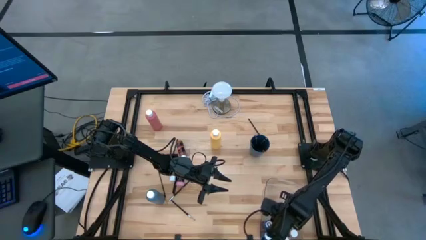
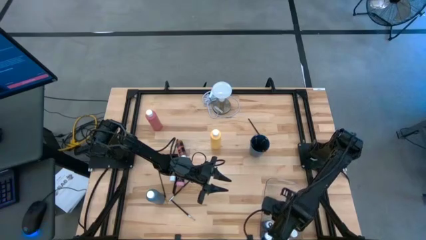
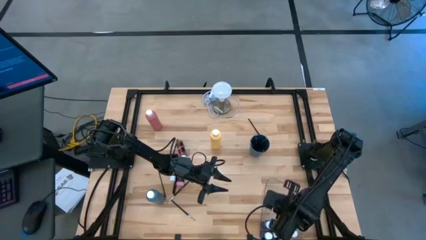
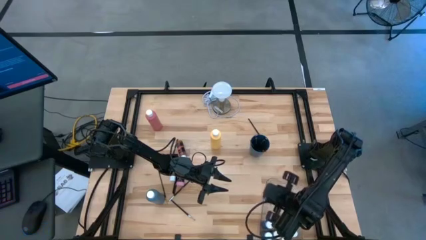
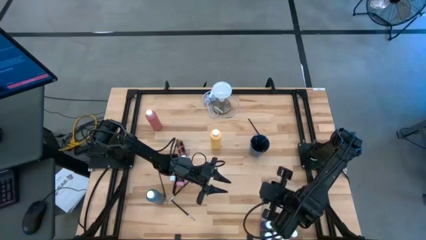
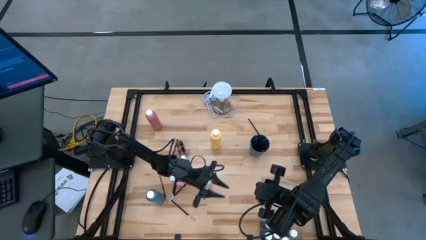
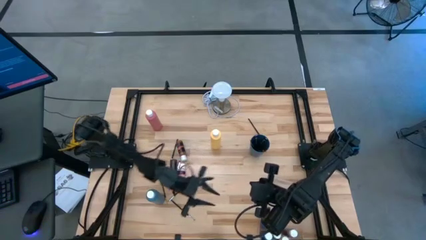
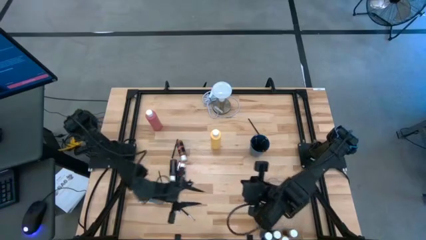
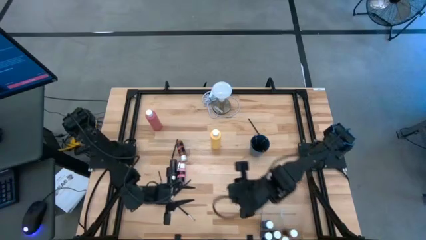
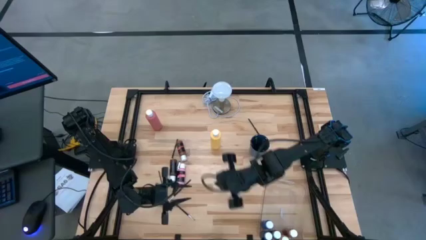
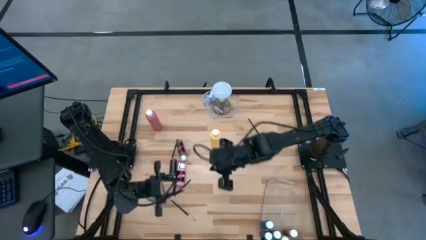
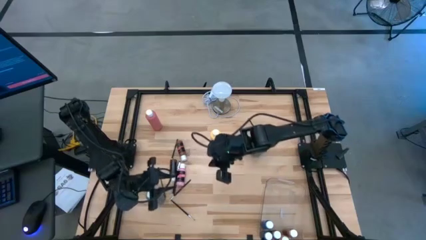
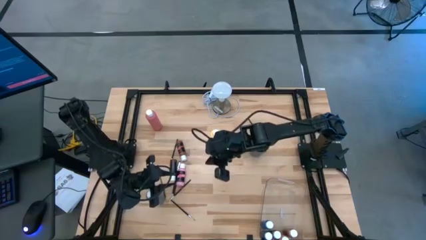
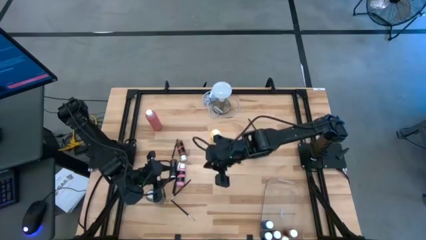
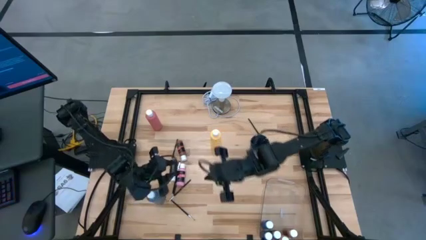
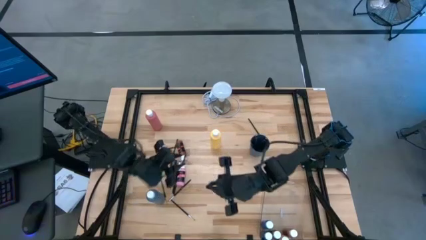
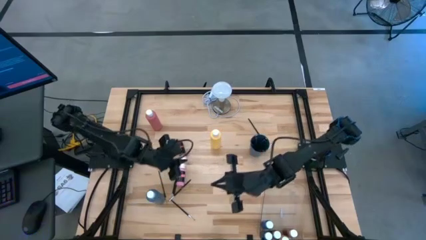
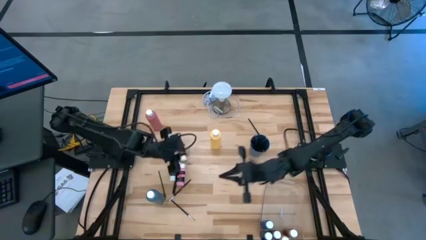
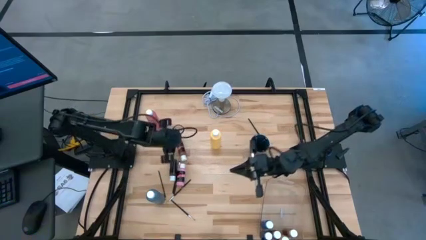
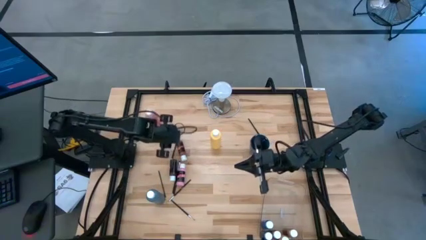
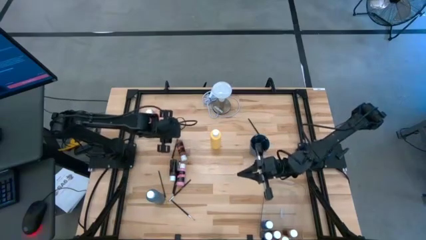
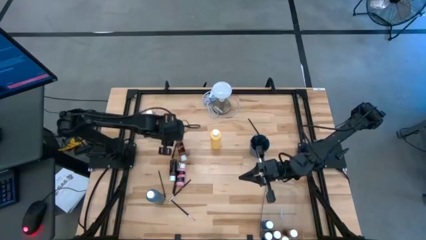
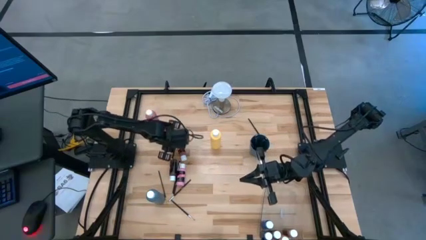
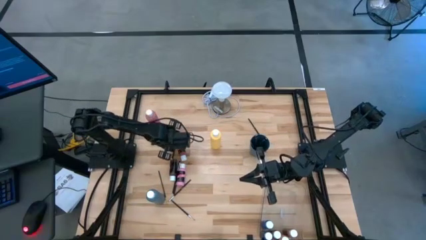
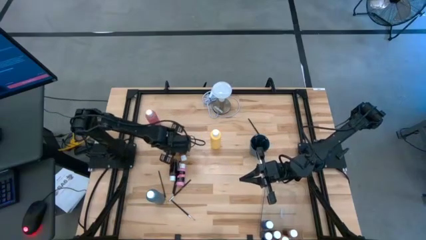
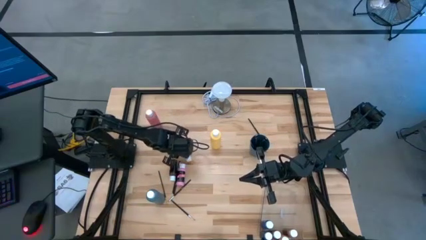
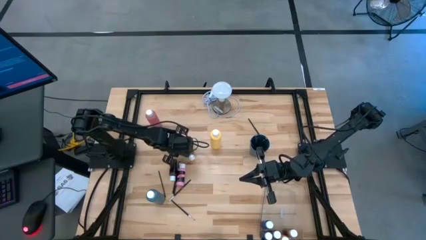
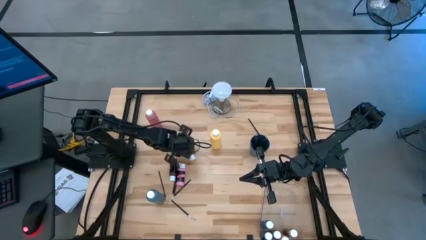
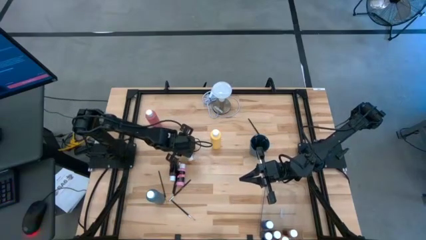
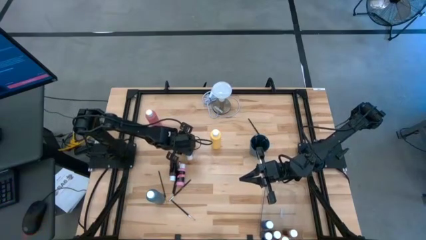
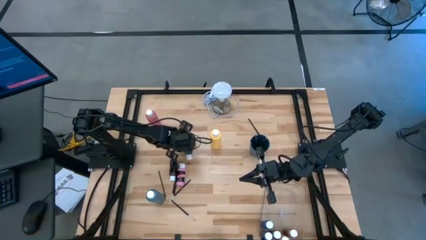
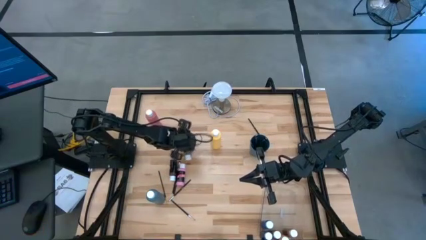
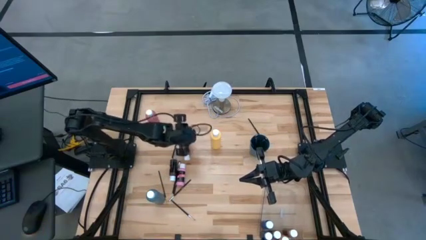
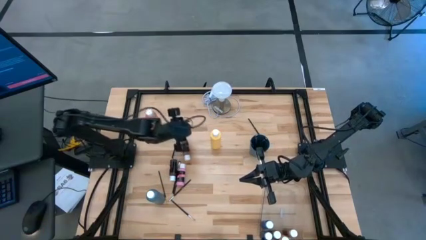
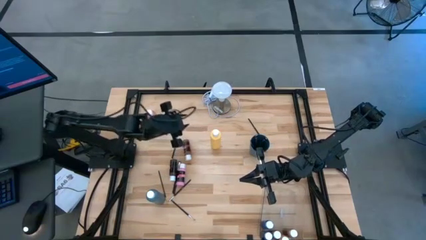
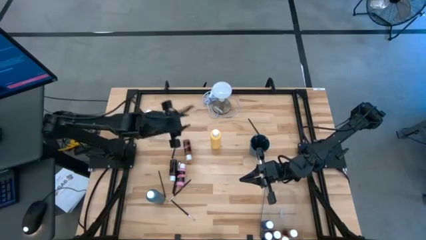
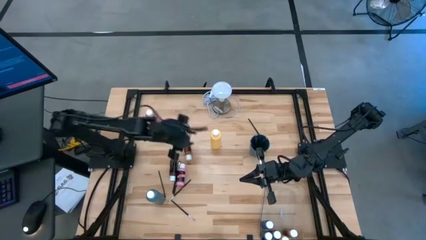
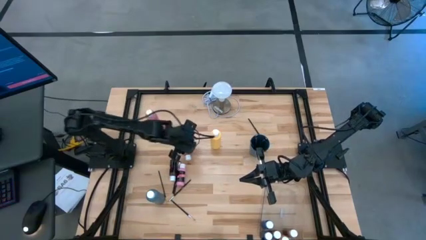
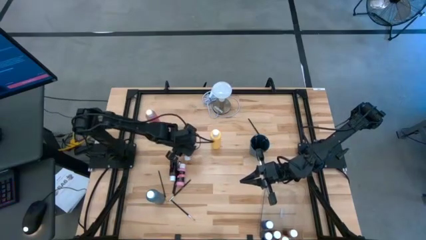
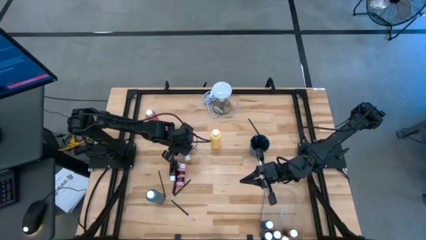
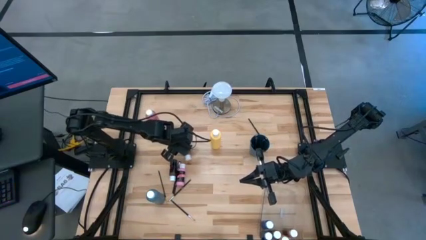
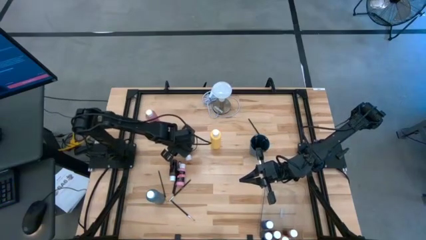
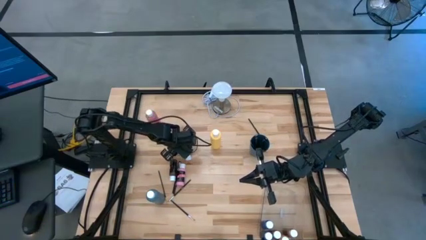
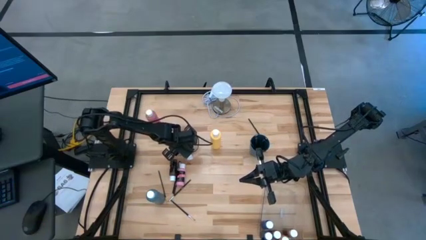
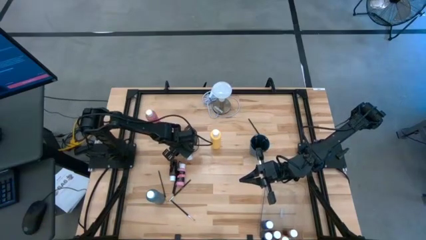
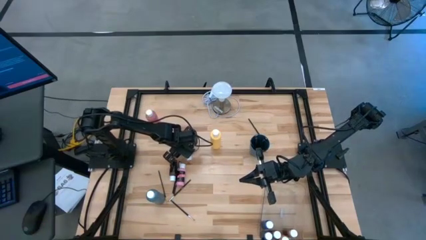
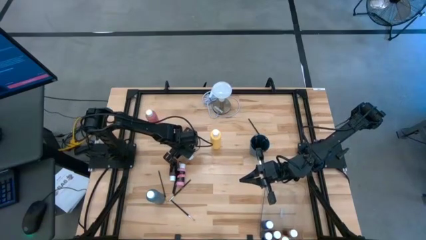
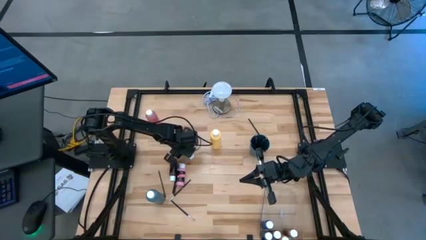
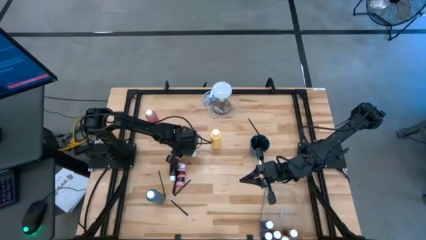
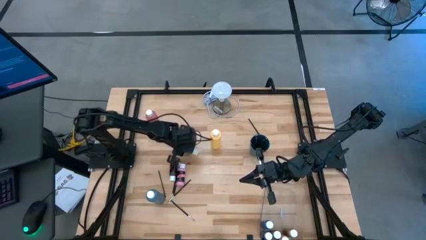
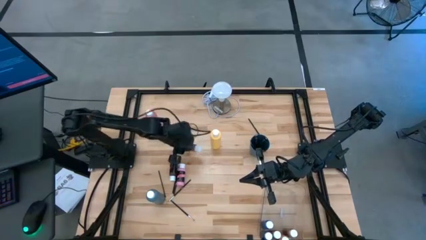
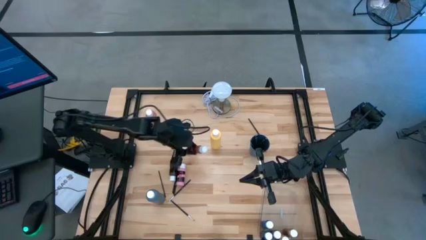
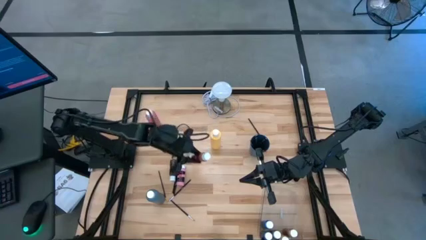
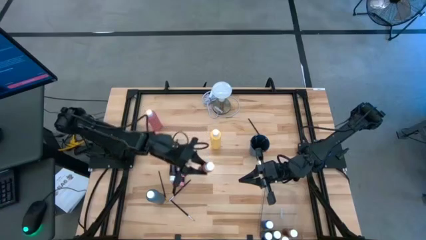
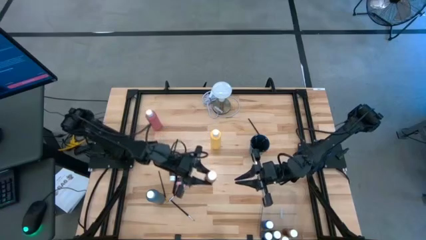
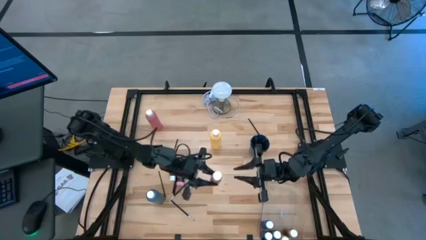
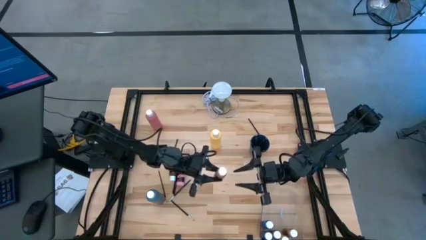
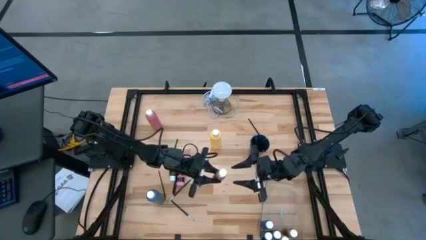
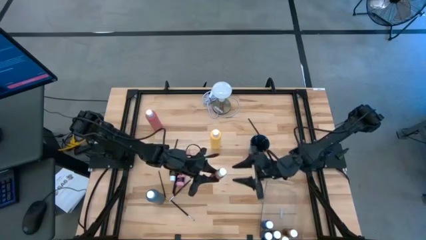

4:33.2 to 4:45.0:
Task: Pick & Place Paint Supplies
Put the top small brown bottle into the transparent bin

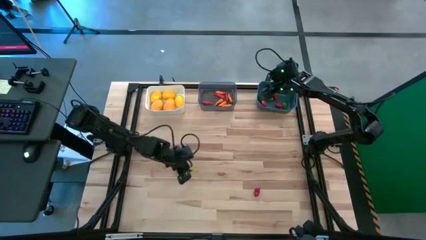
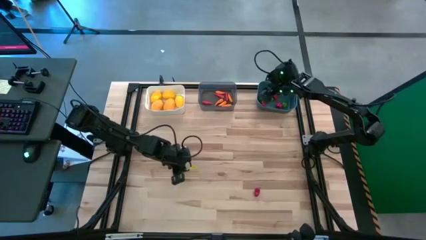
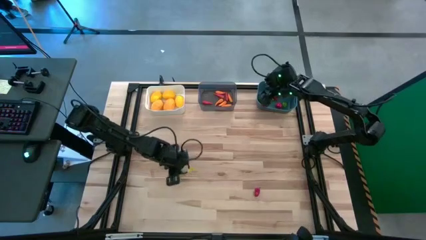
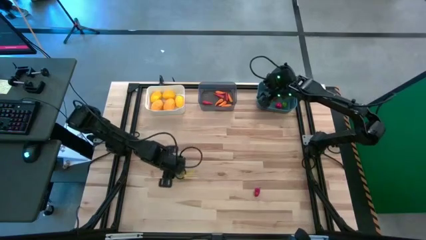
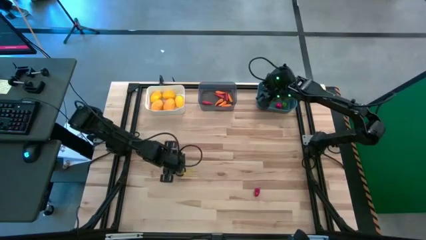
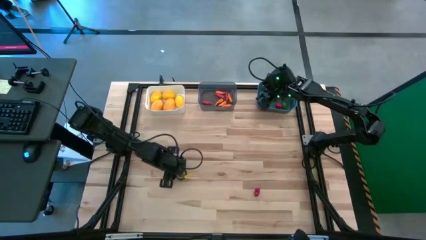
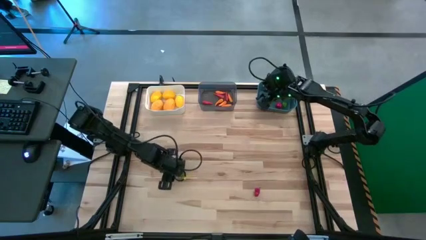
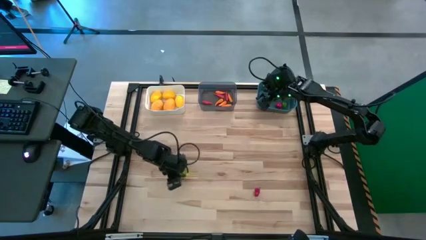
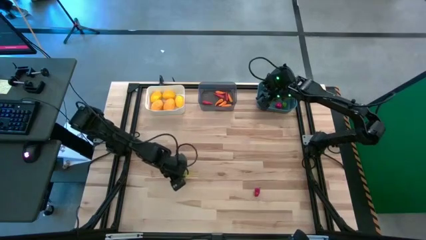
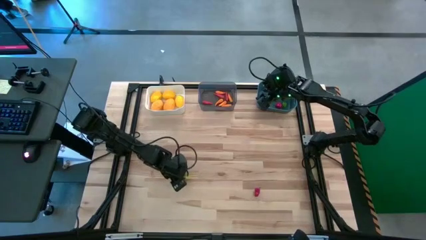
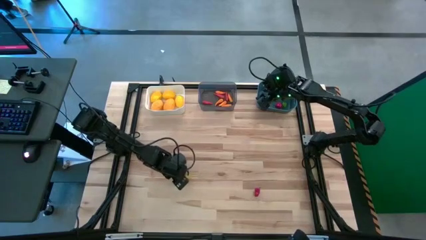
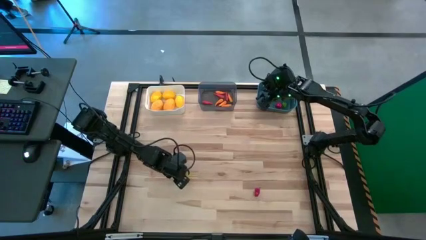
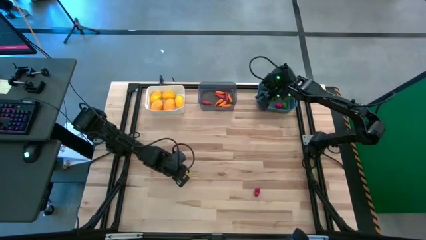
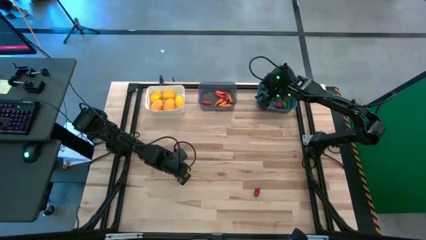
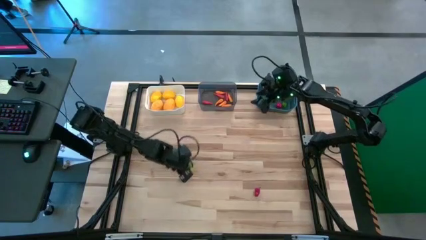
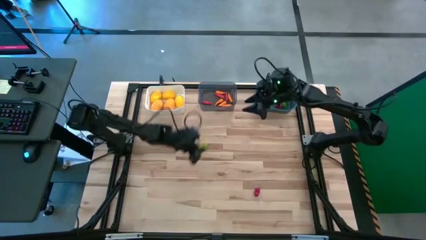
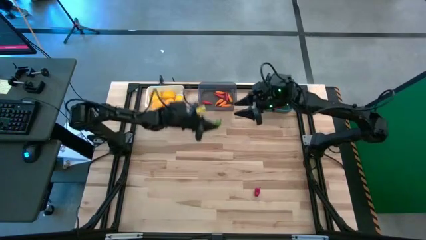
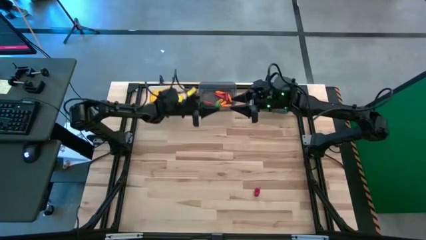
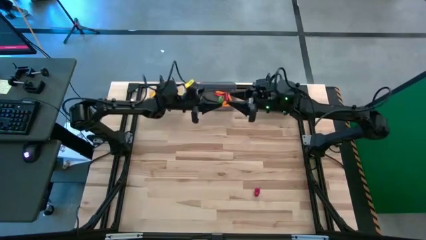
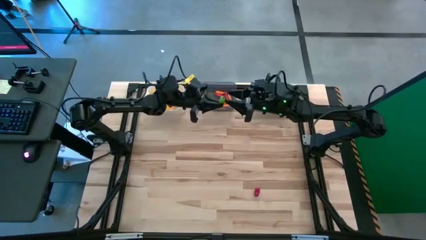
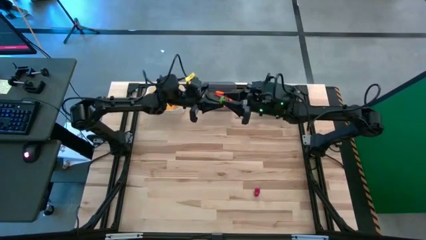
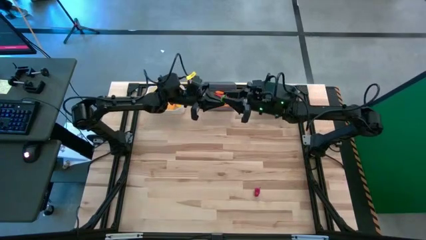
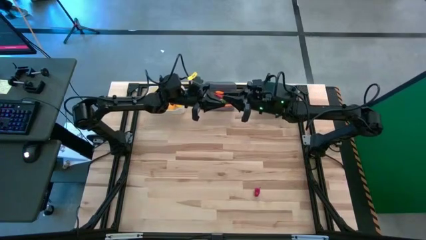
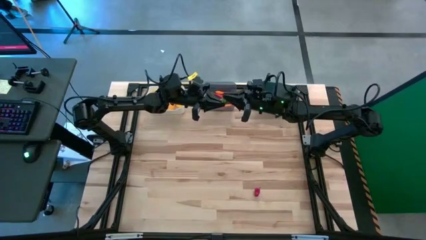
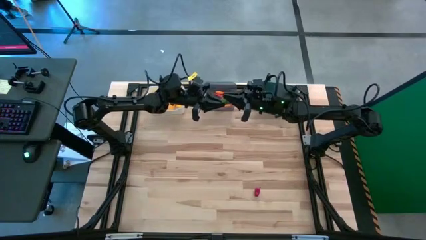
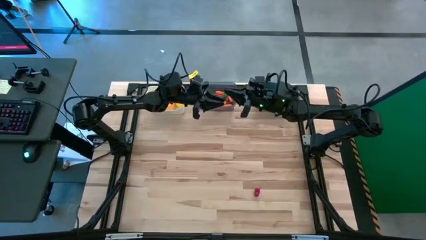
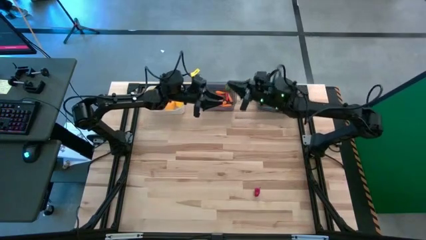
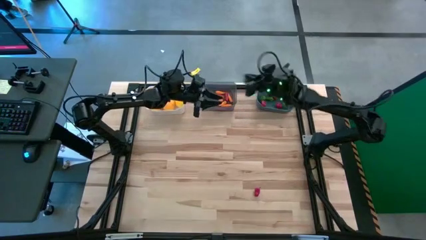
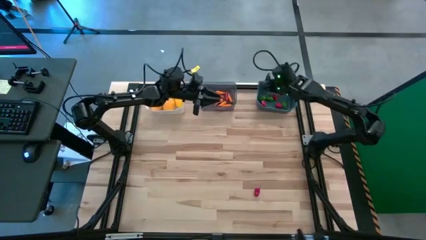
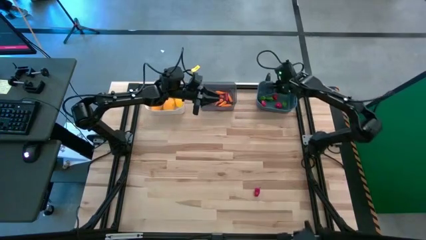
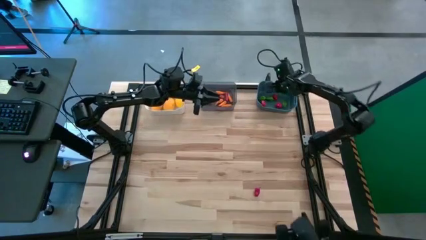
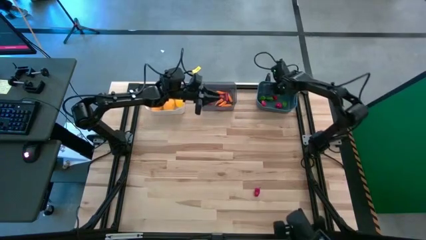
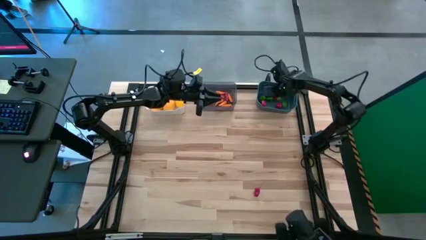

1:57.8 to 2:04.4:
Task: Sort produce into baskets
Put the green bell pepper into the blue bin
